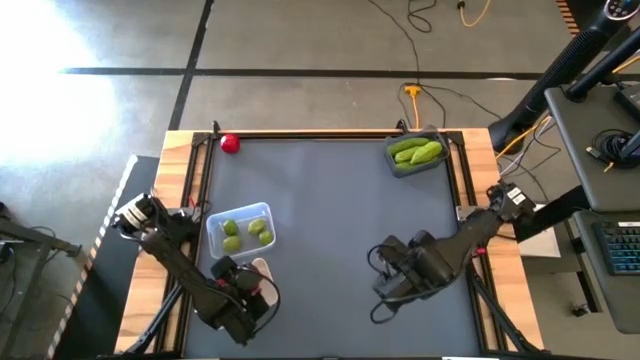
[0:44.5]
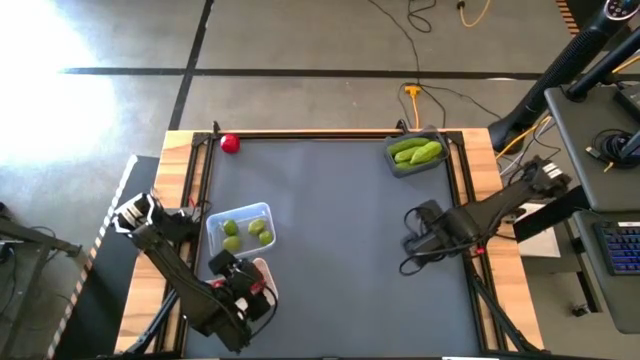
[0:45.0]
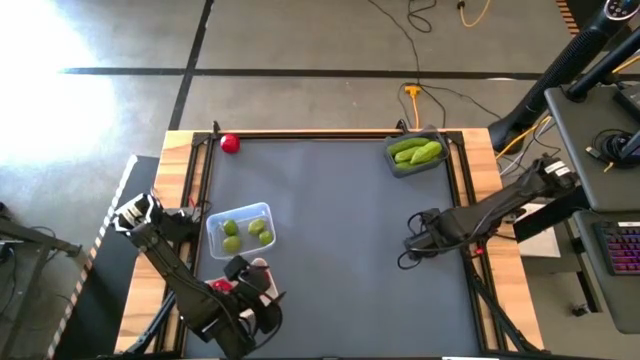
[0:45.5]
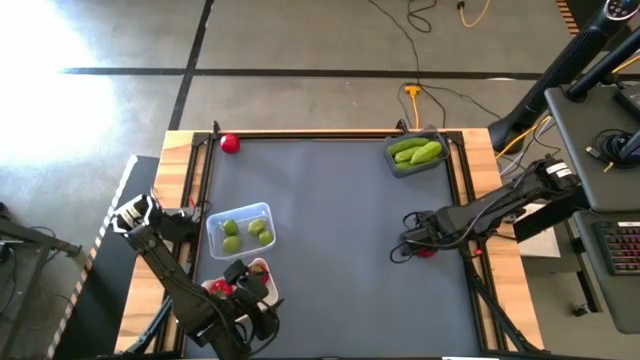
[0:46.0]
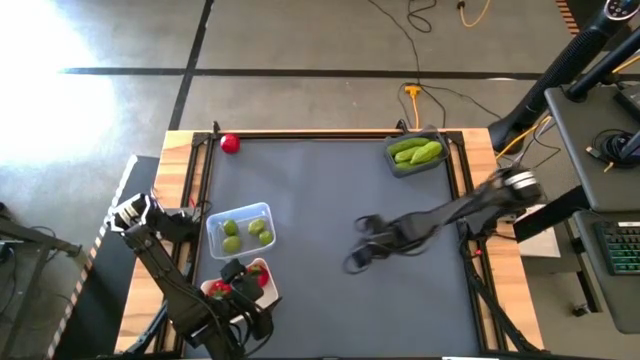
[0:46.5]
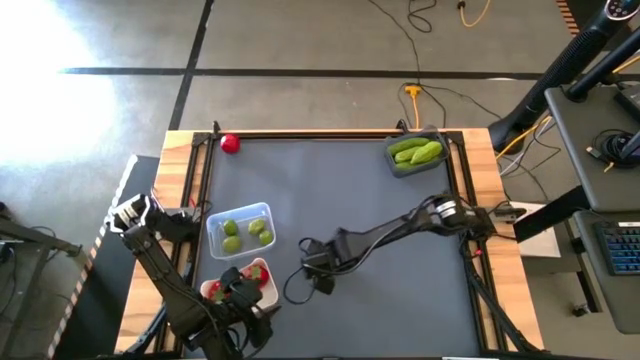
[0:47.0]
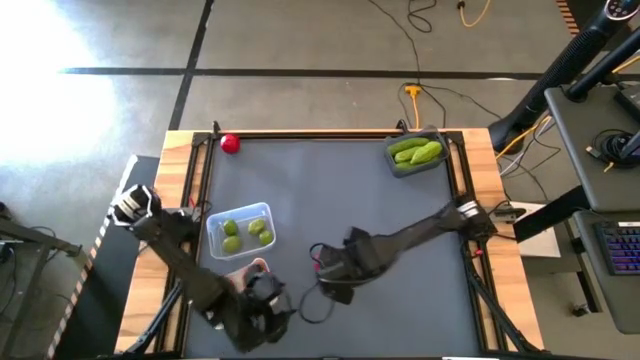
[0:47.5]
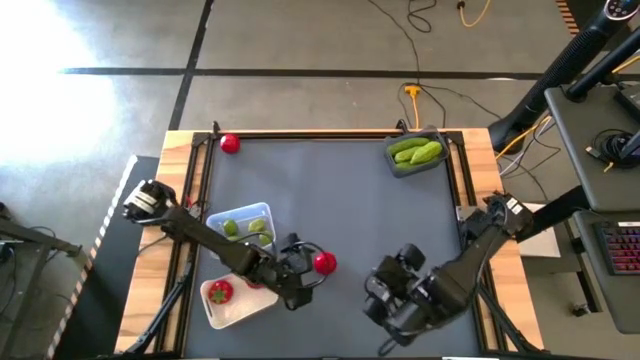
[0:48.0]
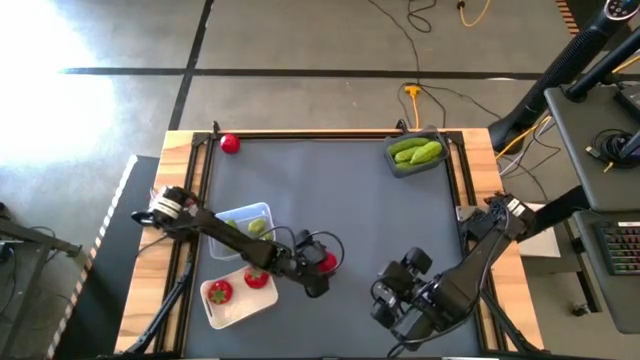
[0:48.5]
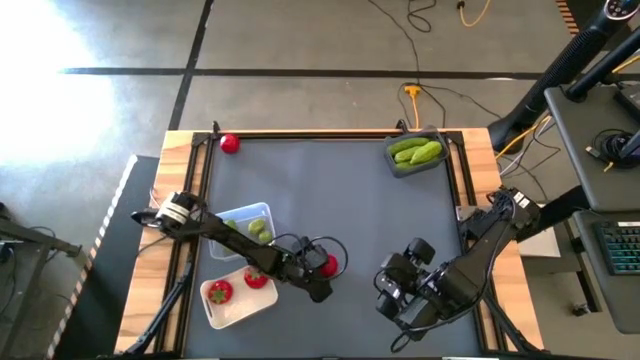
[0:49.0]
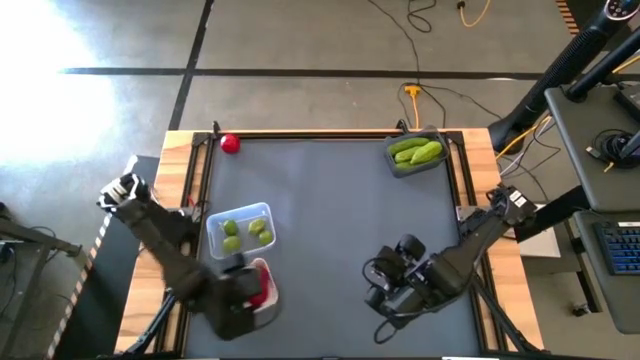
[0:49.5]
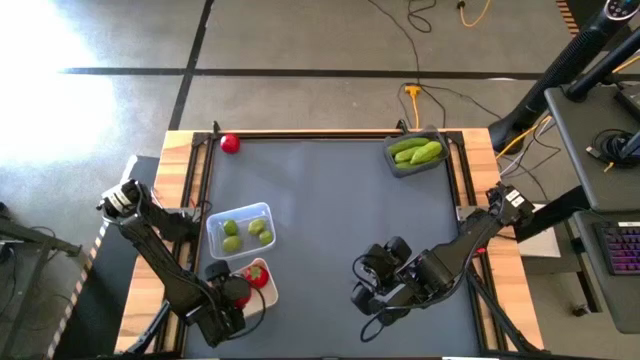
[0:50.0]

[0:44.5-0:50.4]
Task: Sort produce into baskets
Put the tomato into the white bin

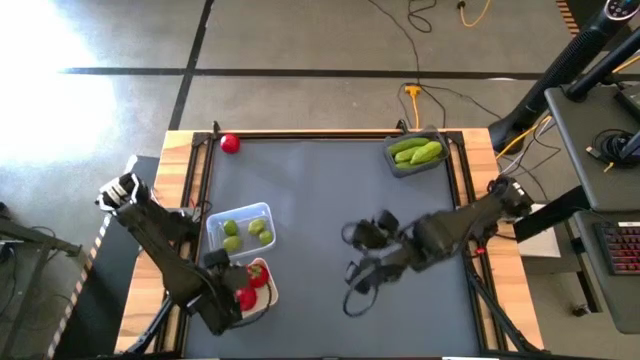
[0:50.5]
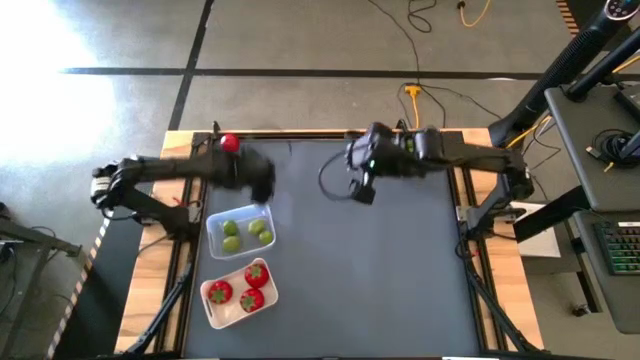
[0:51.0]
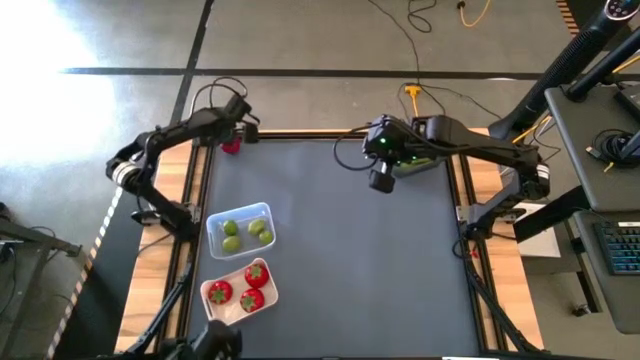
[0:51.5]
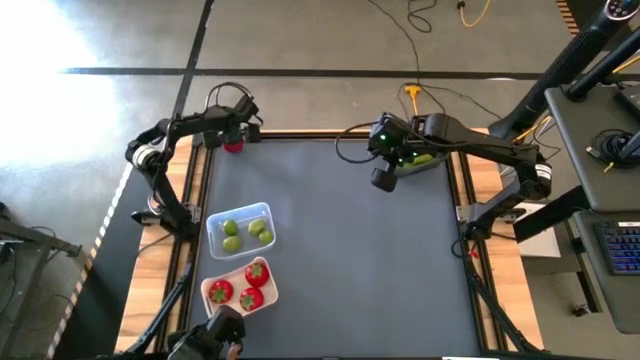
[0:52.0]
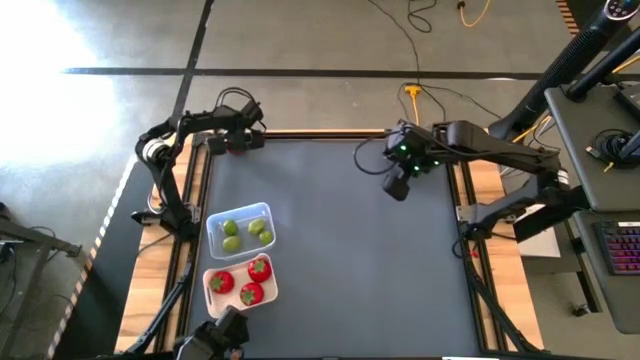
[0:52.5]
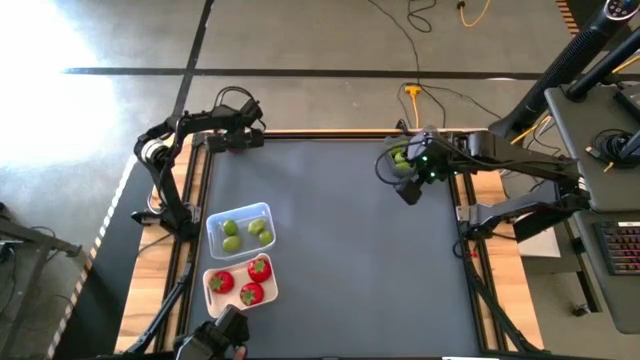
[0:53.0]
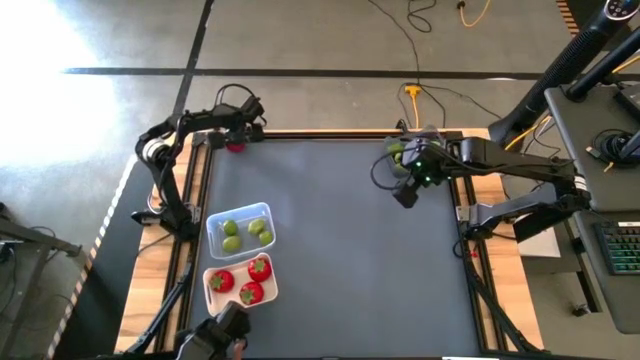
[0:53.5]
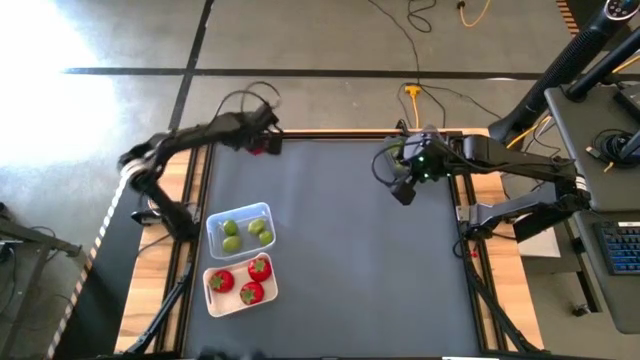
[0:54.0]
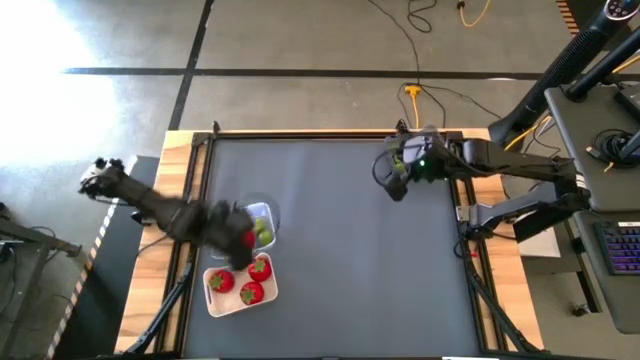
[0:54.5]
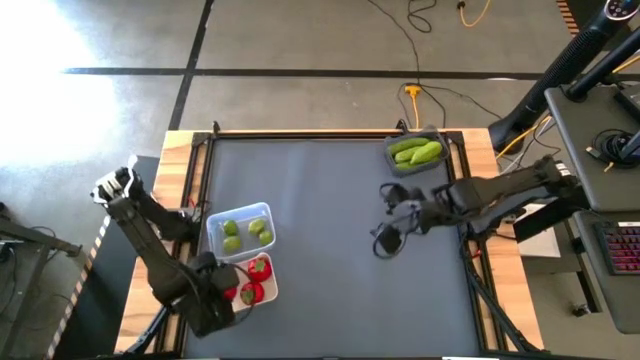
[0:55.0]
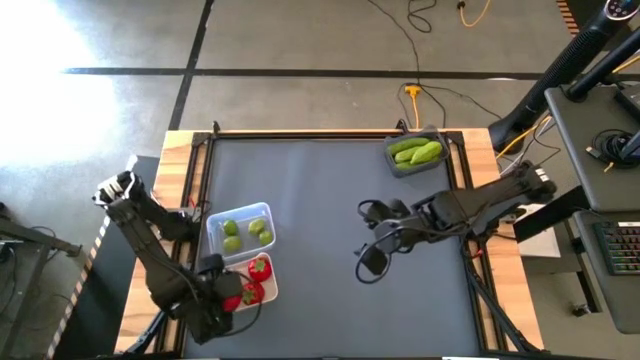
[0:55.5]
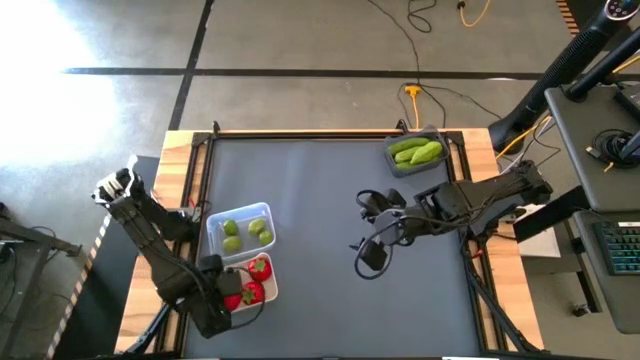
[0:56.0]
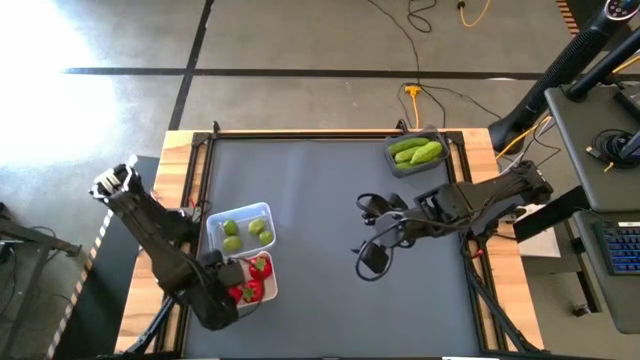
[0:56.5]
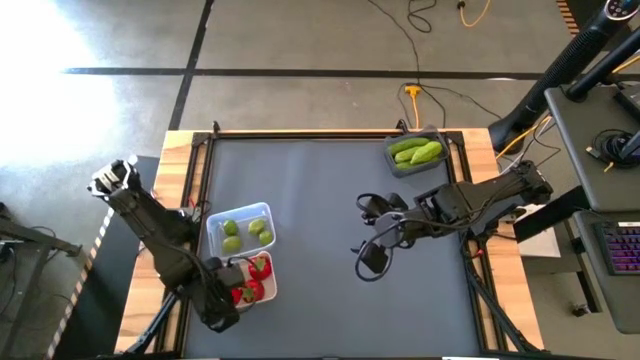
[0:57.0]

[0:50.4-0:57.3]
Put the tomato into the white bin

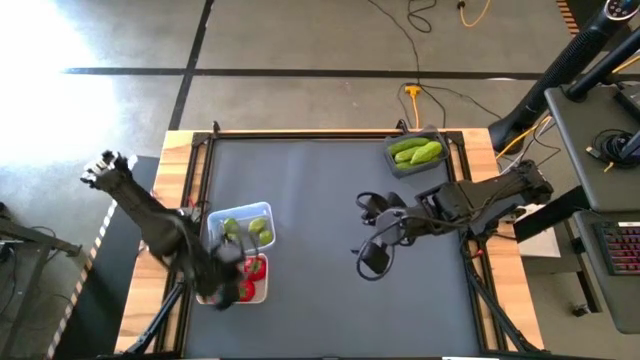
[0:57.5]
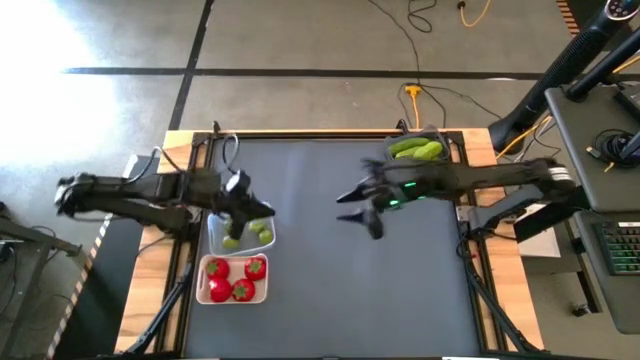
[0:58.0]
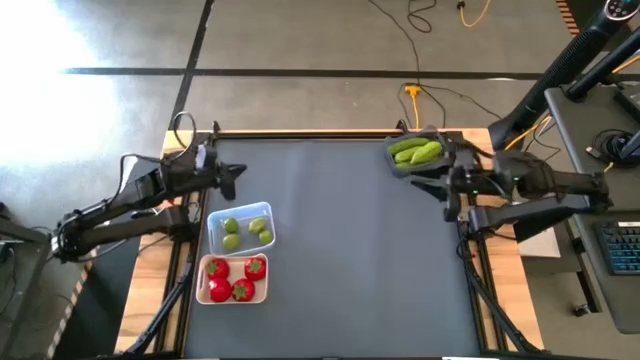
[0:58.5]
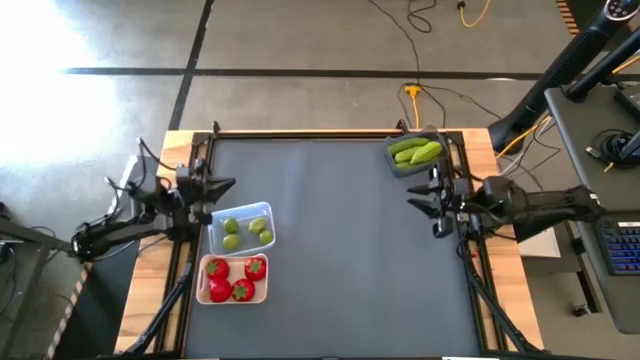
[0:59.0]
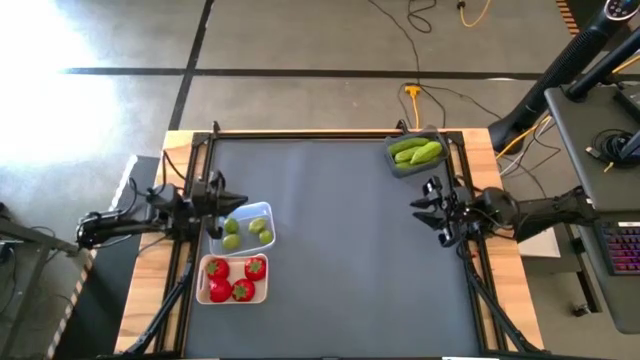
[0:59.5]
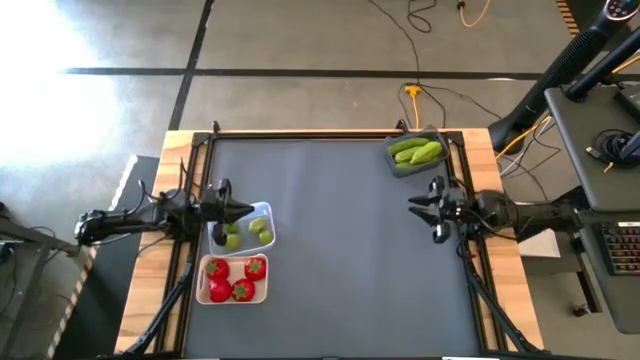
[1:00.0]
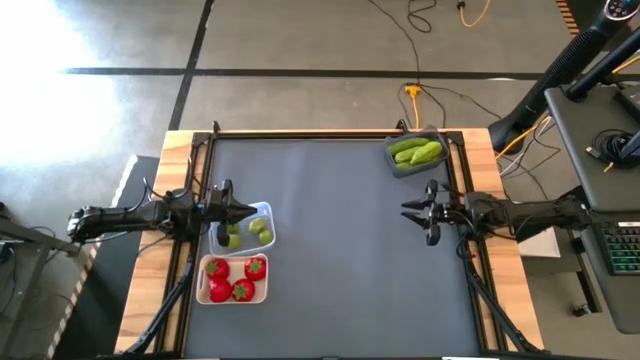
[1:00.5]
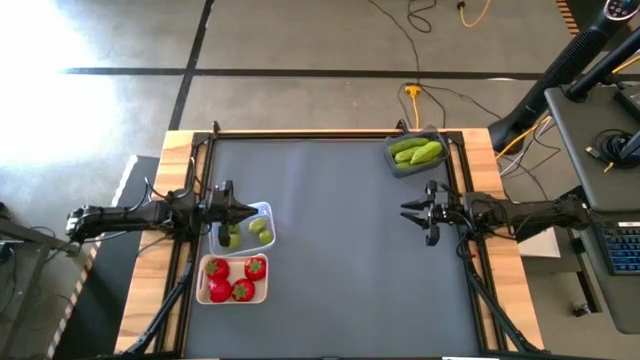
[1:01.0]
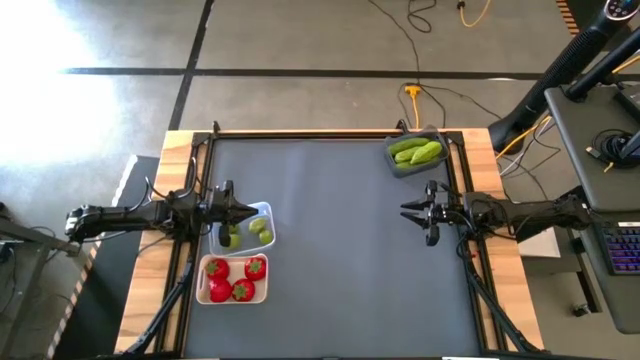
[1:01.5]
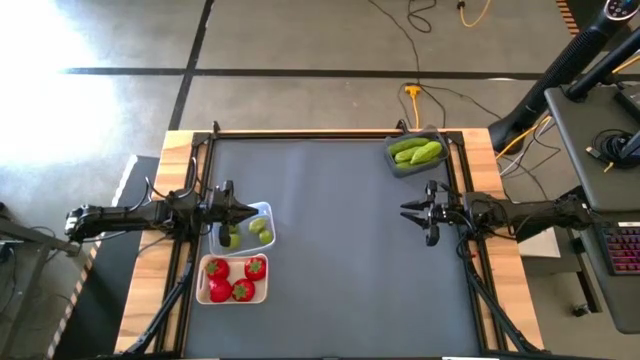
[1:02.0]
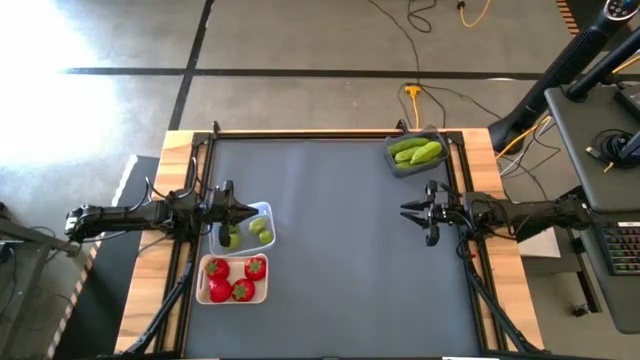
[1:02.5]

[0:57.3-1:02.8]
Return to Home Position

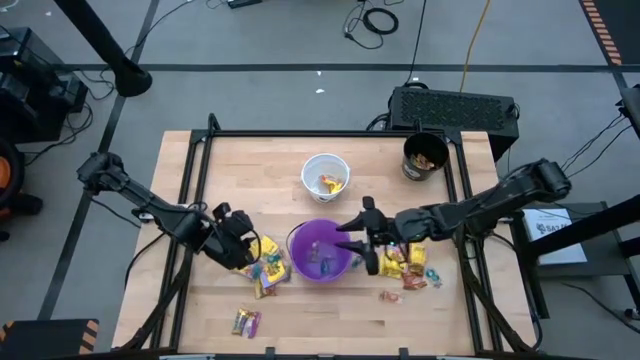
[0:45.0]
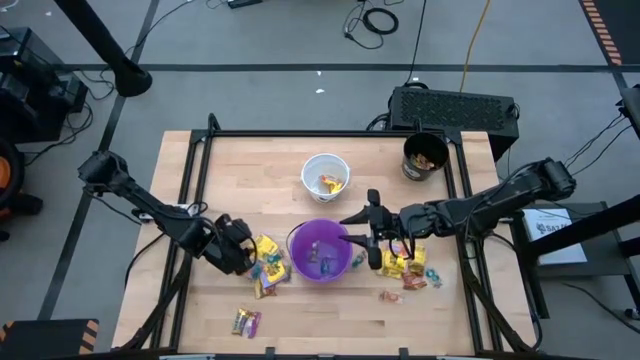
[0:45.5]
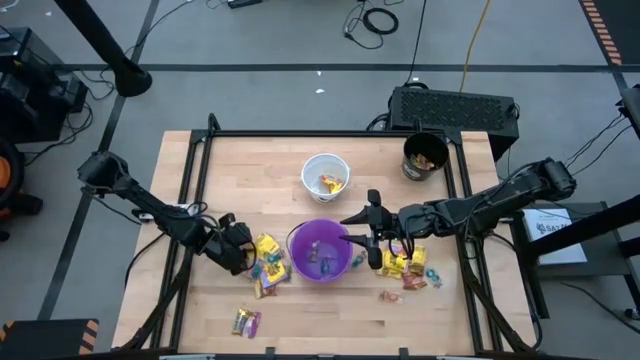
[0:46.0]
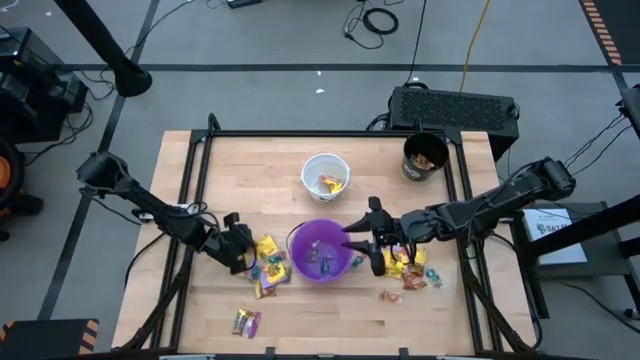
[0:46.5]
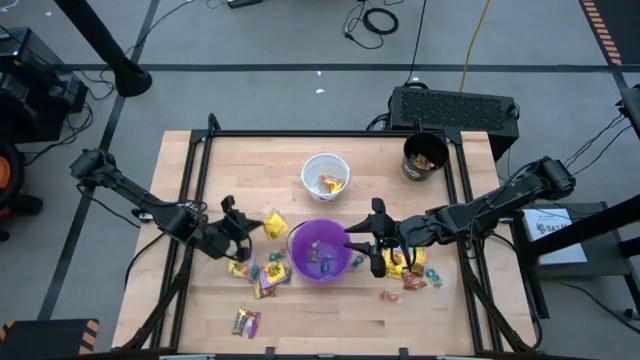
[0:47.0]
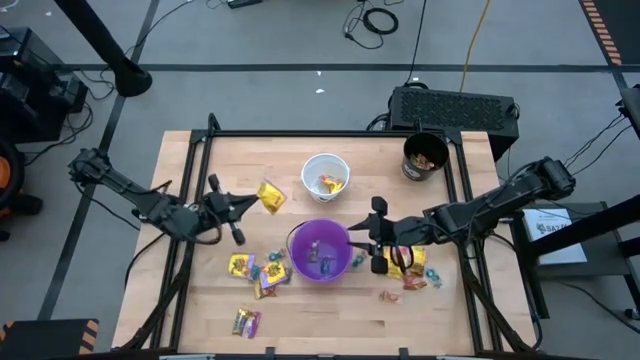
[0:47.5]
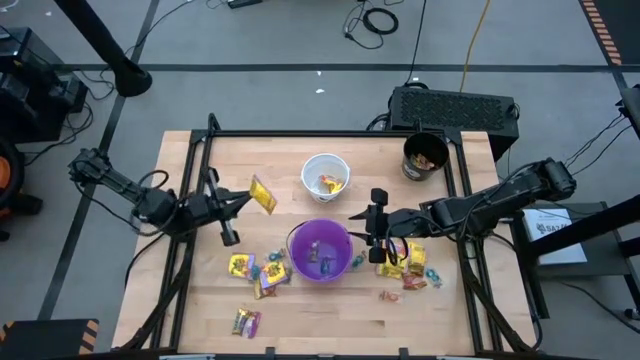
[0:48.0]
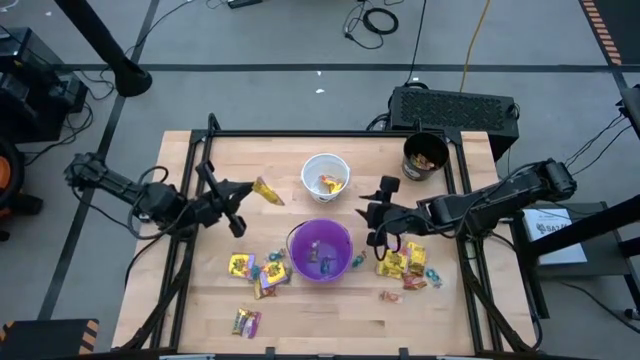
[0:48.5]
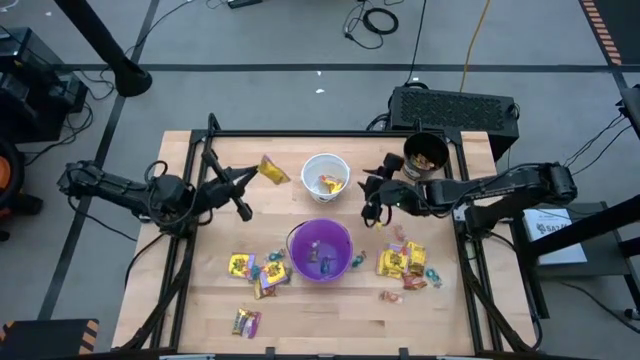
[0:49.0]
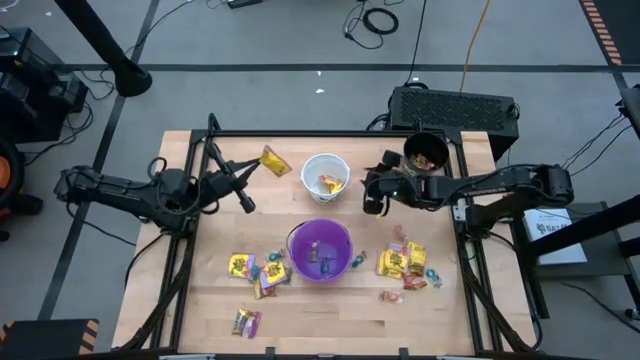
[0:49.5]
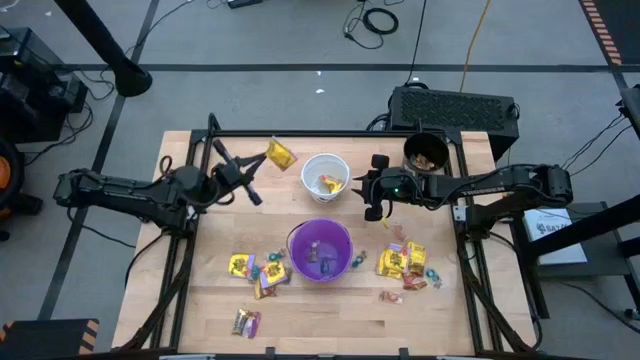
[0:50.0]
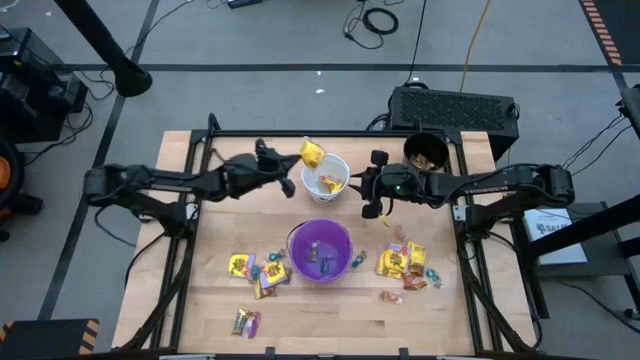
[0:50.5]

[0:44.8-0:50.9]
Task: Sort candy by brand, put in halloween buckets
Put the yellow candy into the white bucket
